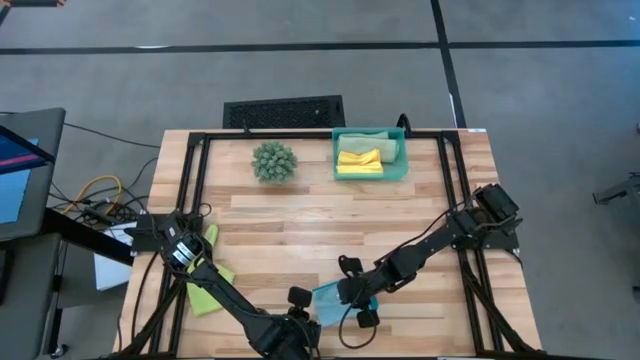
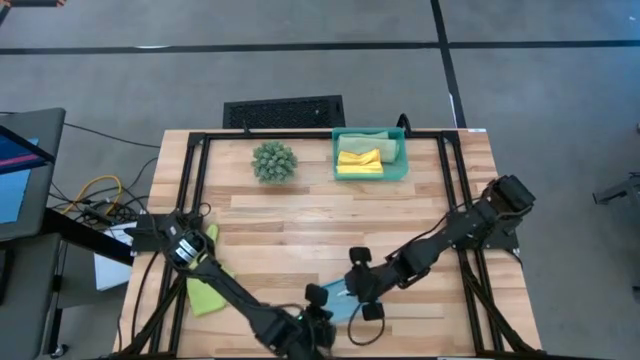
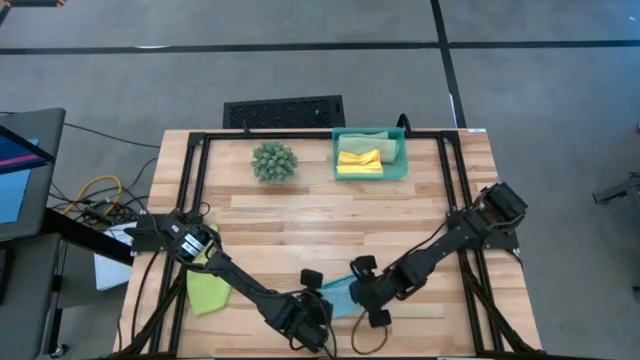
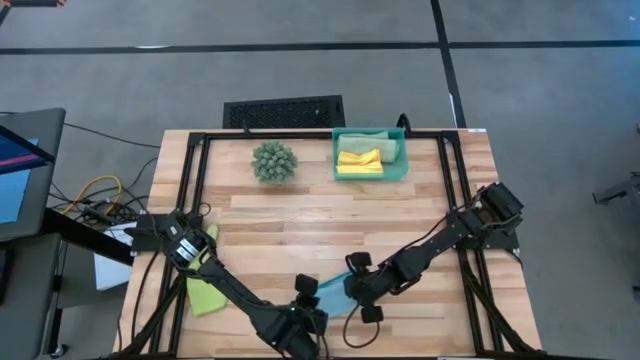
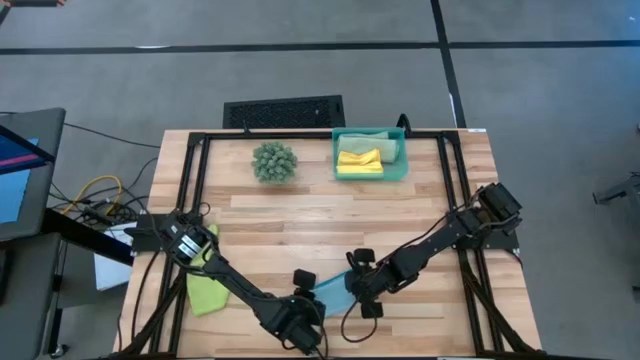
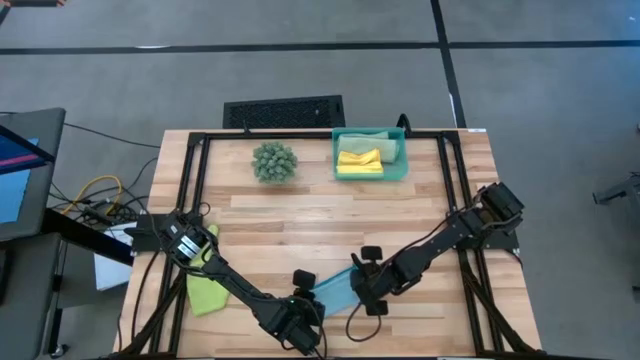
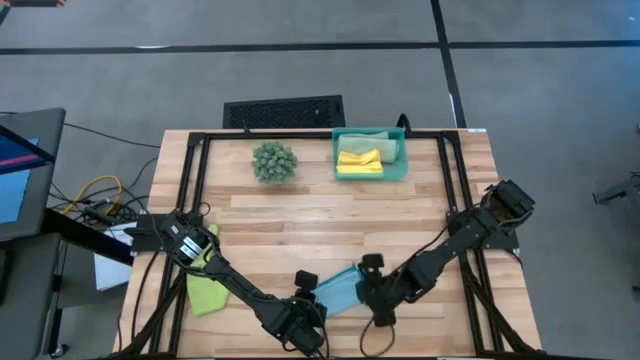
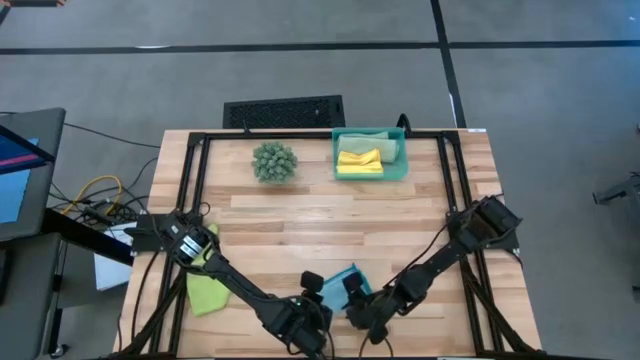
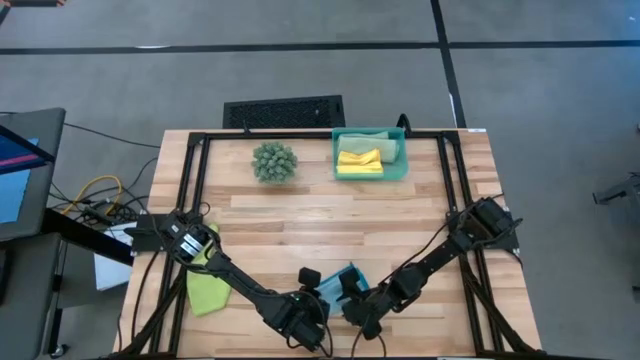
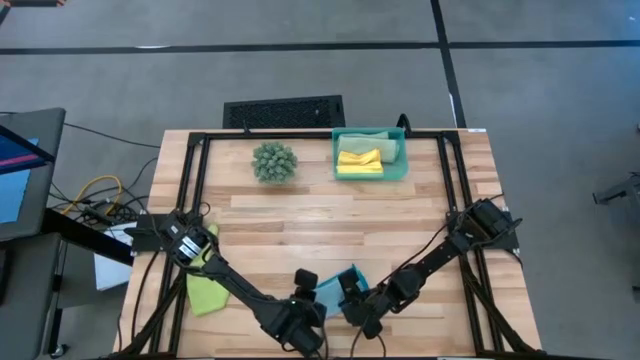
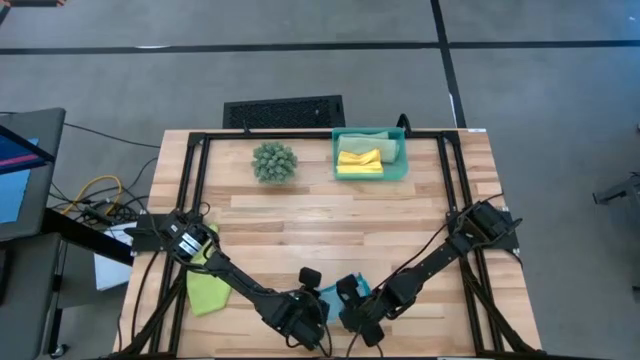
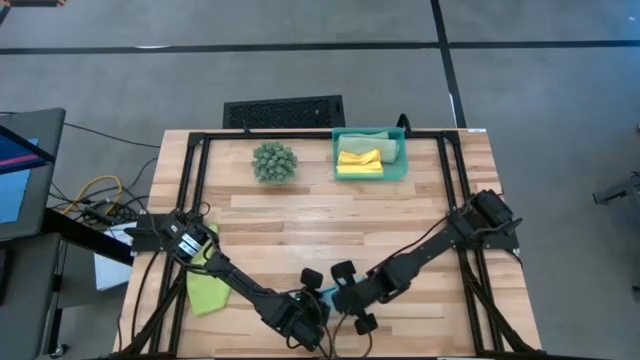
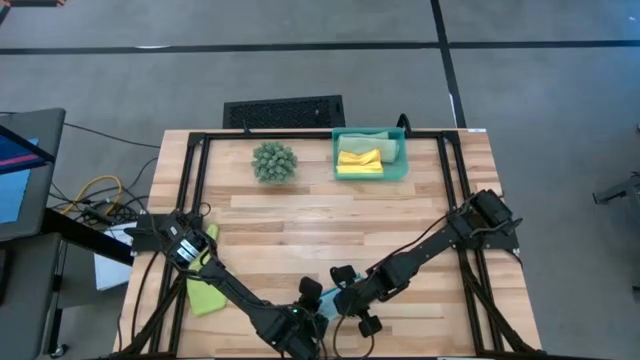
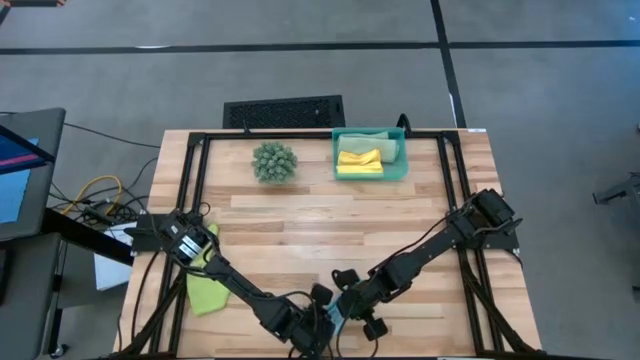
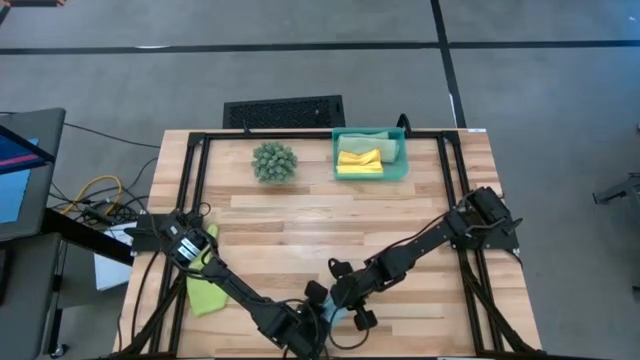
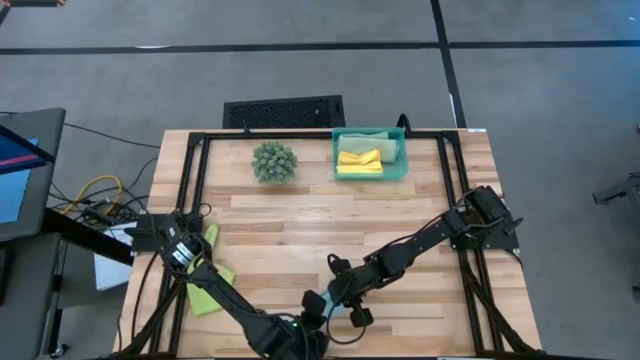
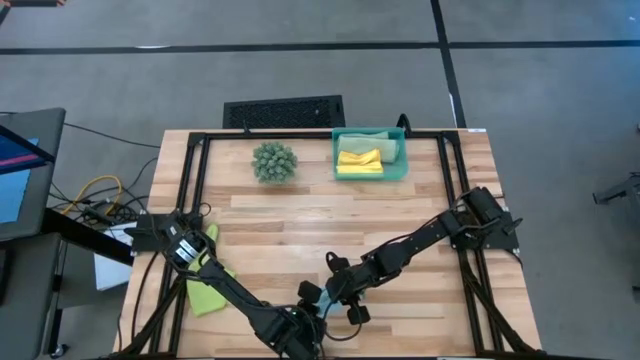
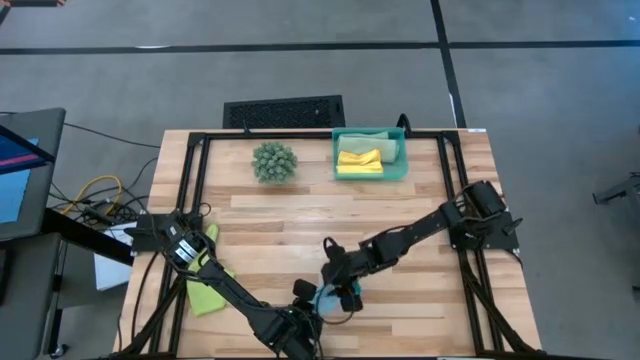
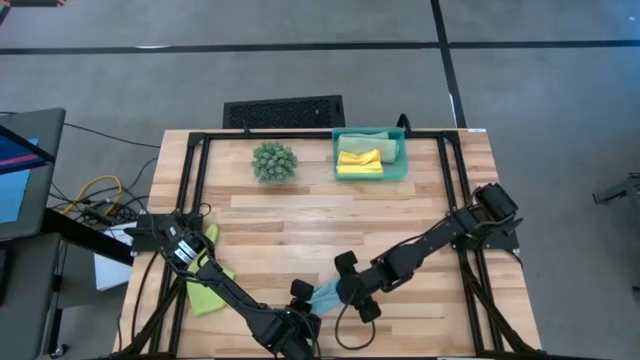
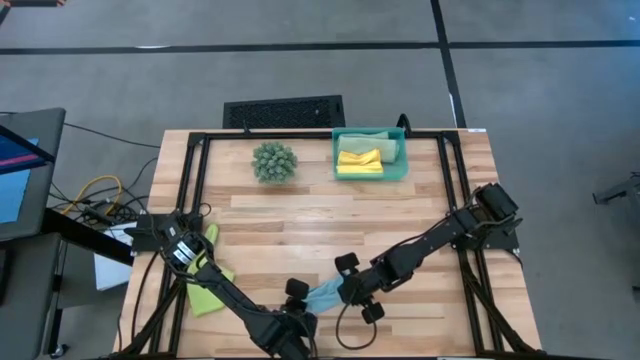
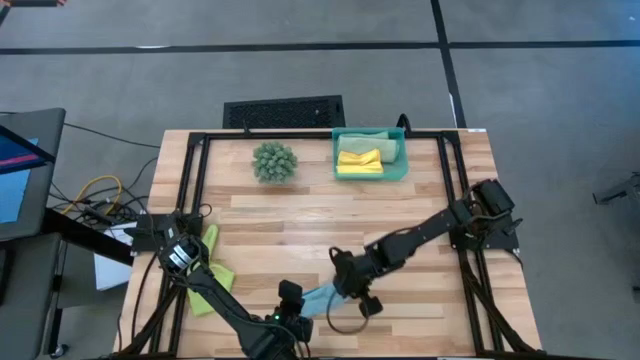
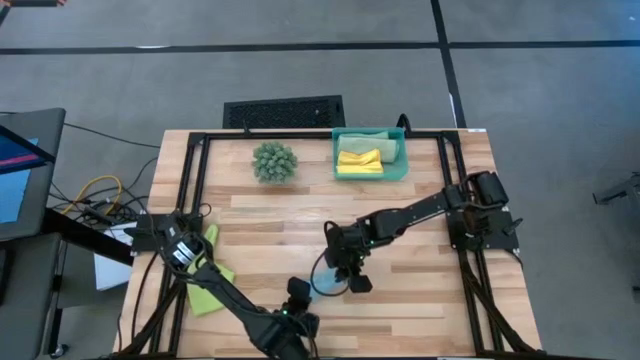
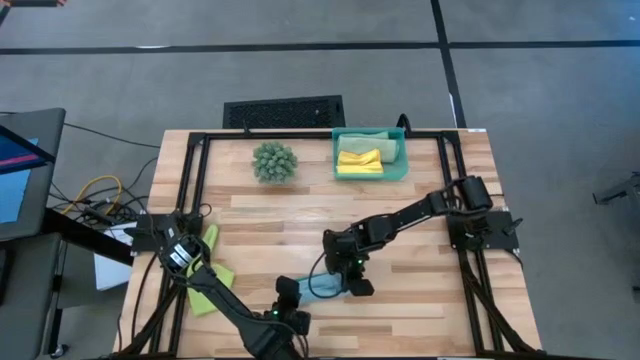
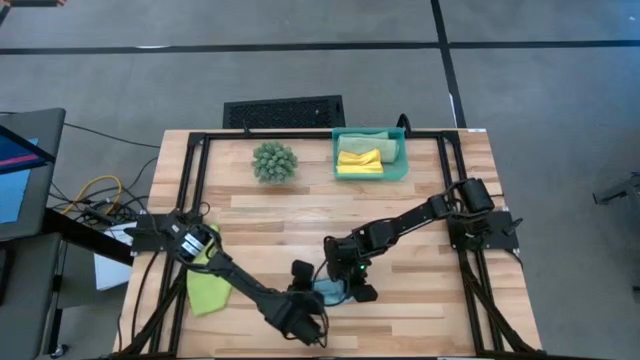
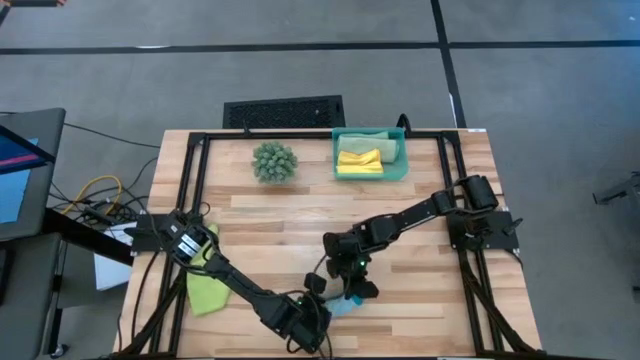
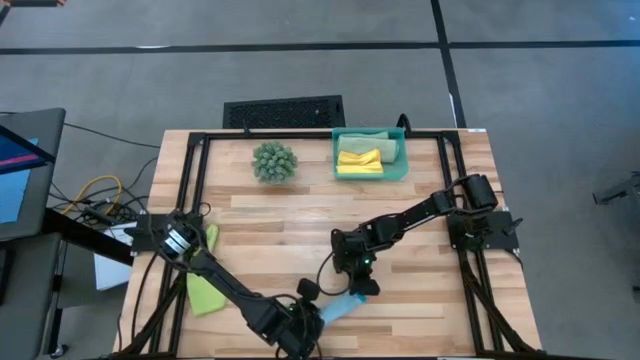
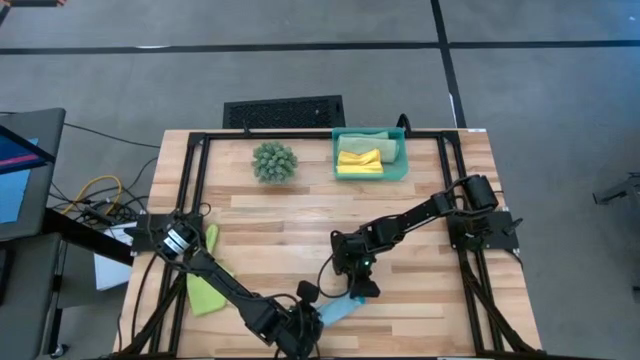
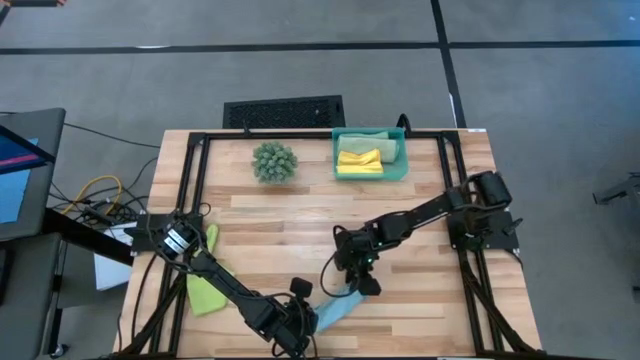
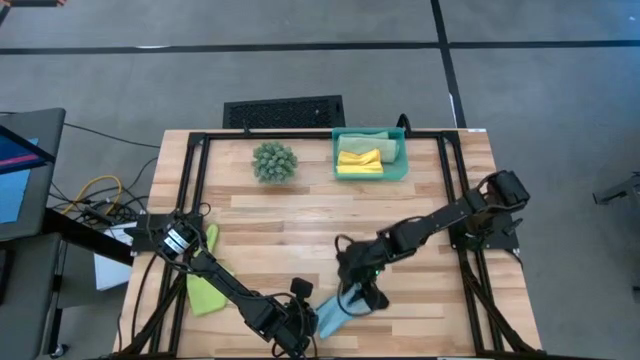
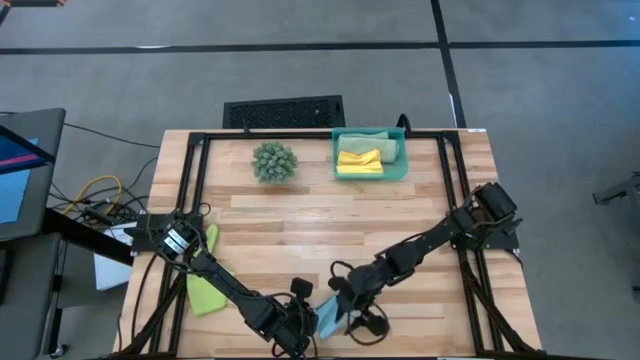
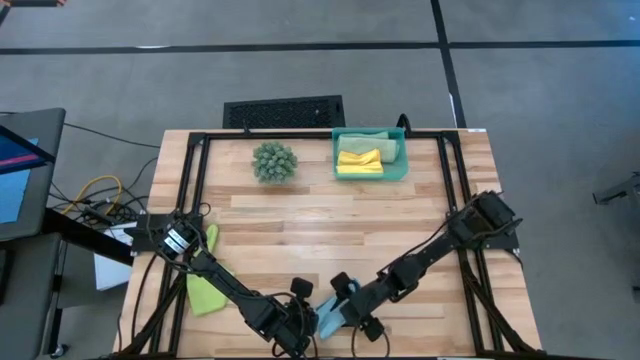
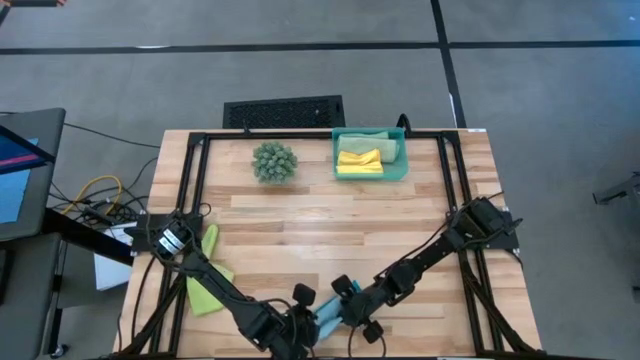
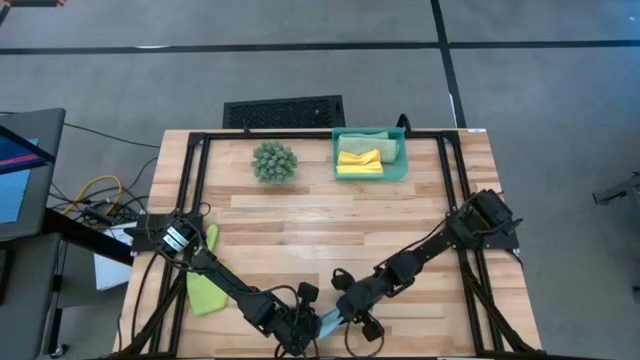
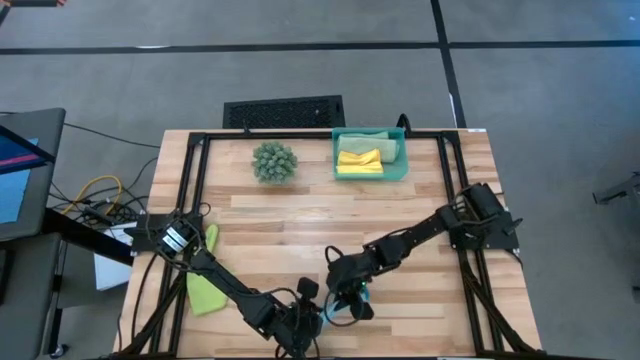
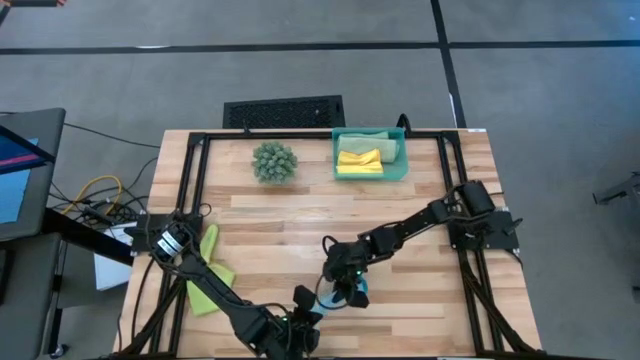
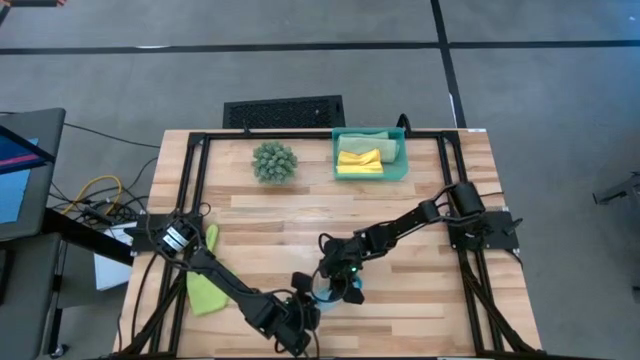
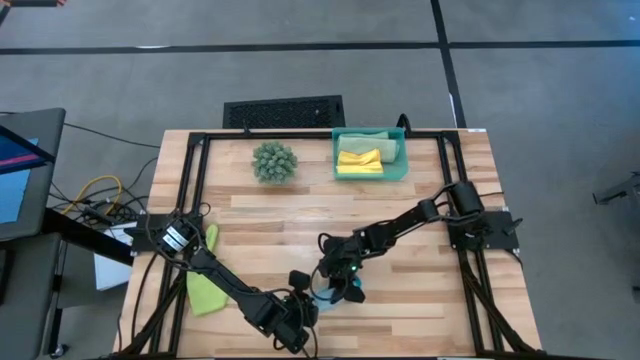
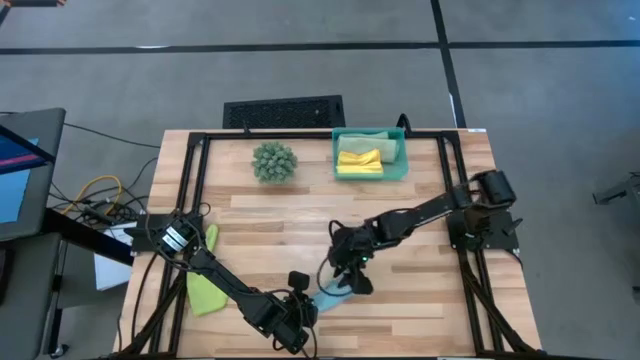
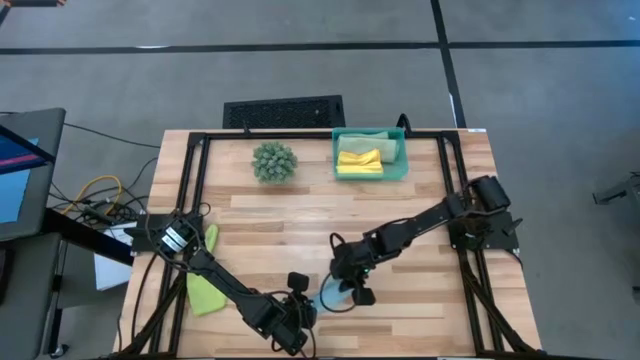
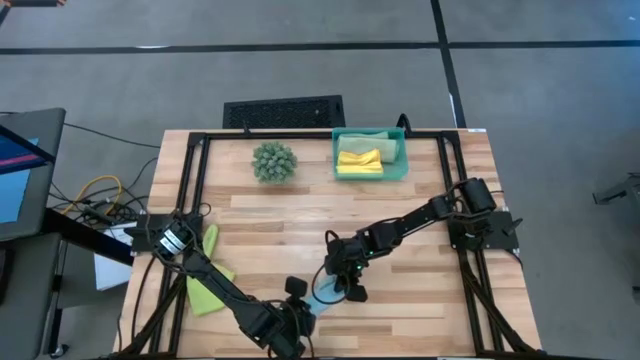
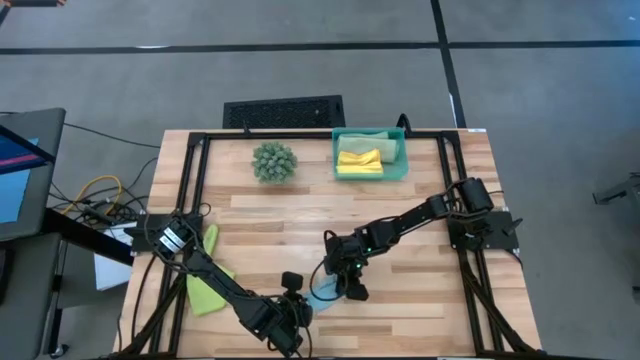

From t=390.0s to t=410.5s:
Task: Roll microfiber towels into tight, uniform cylinder then place into a basket
Roll the blue microfiber cloth
